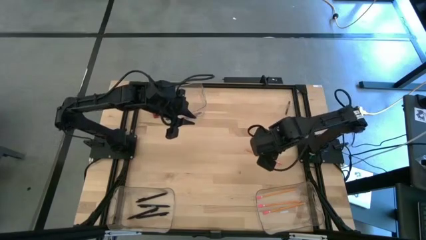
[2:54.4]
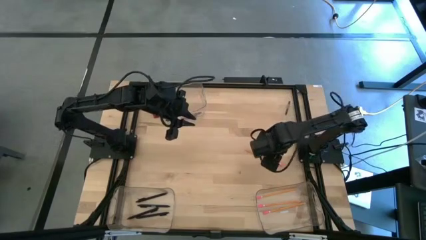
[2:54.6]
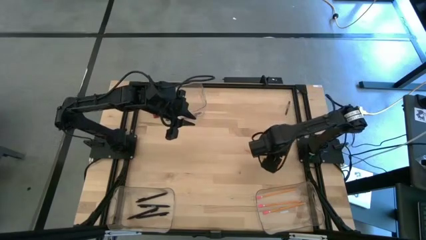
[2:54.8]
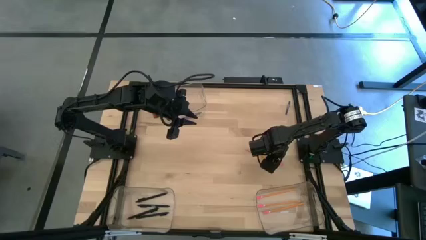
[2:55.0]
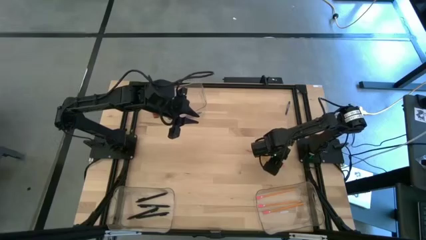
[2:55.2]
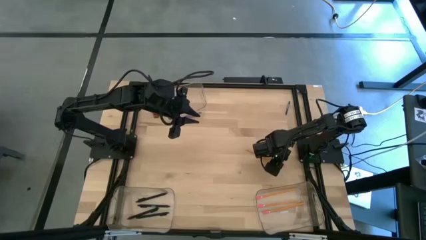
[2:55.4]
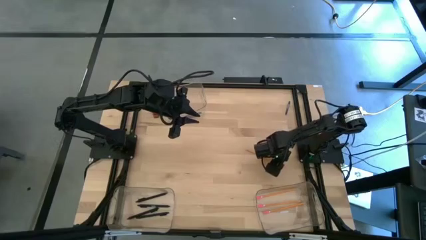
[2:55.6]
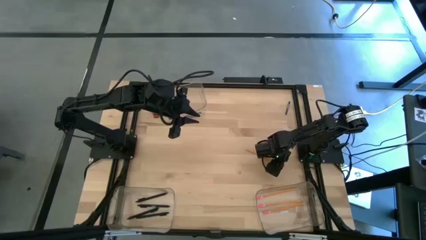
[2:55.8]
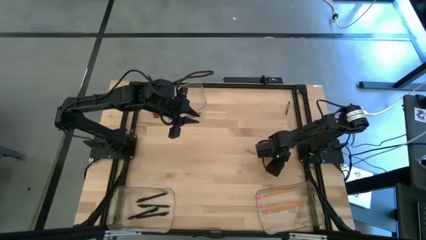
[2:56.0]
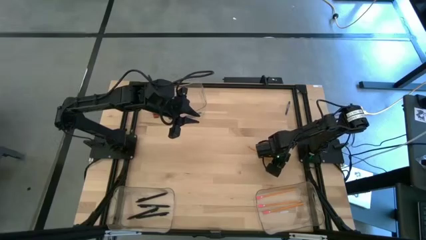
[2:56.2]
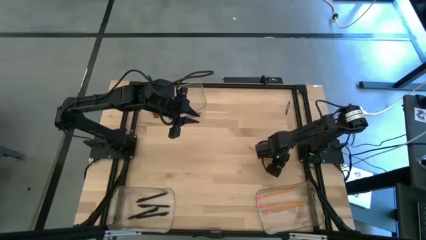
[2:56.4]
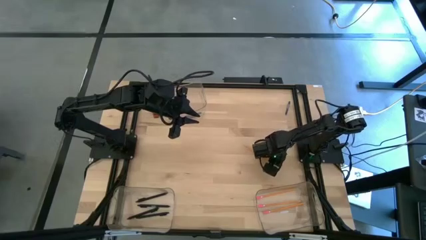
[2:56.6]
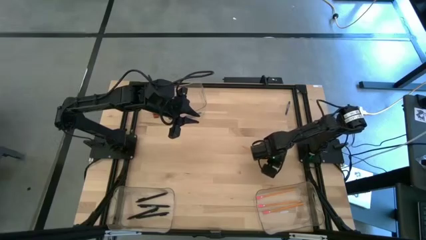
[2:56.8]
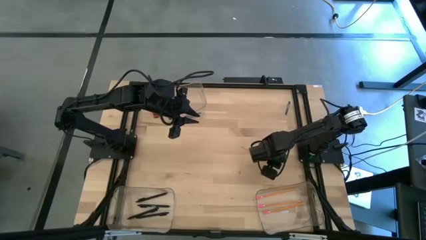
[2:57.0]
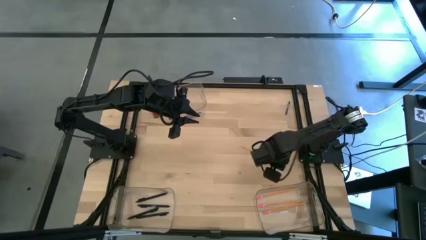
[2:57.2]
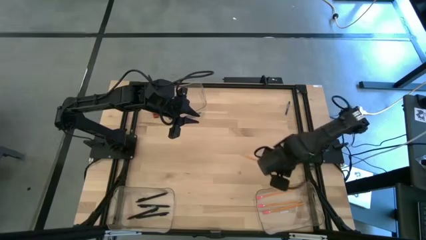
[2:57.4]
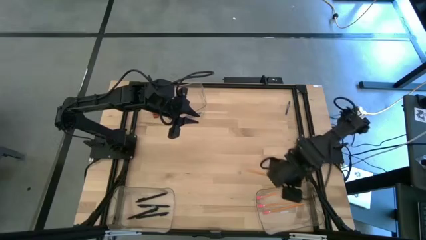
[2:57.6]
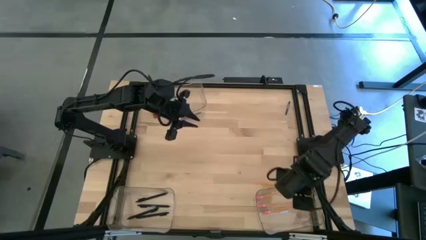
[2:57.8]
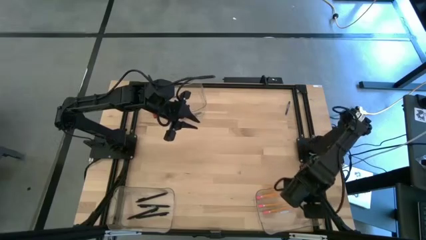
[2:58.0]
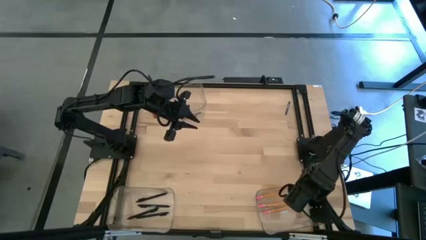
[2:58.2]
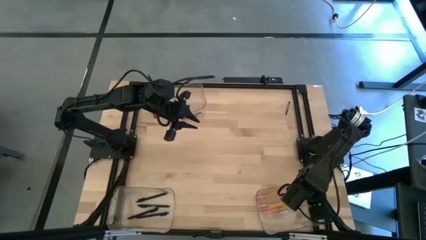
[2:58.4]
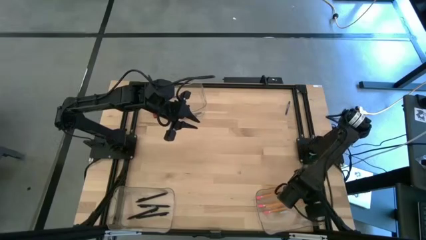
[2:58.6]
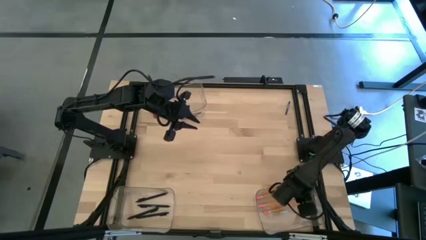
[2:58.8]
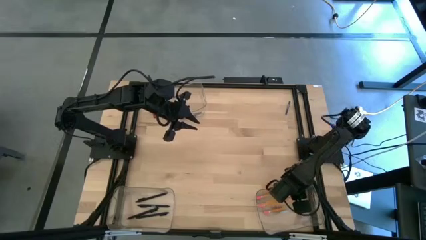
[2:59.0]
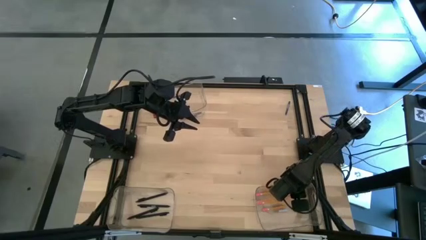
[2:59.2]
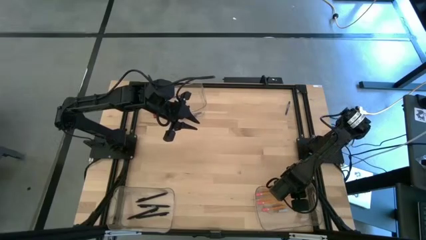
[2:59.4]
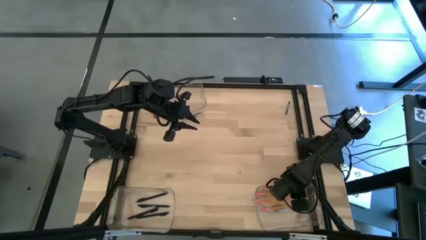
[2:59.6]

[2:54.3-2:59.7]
Task: Sort crayons/erasers/pens/pencils in bins
Put the yellow pencil into the bottom right transparent bin

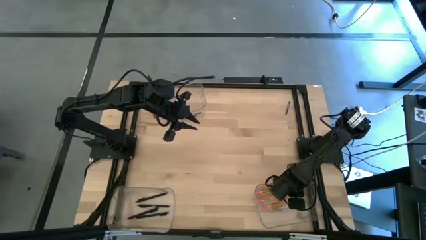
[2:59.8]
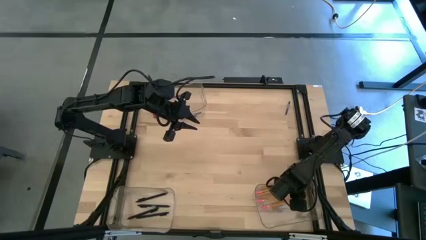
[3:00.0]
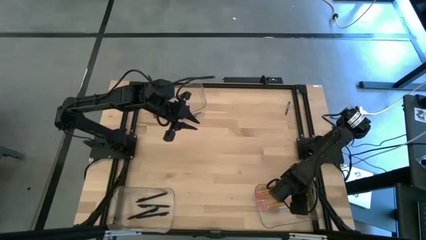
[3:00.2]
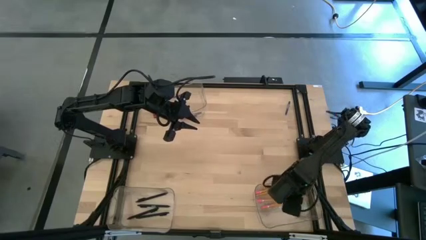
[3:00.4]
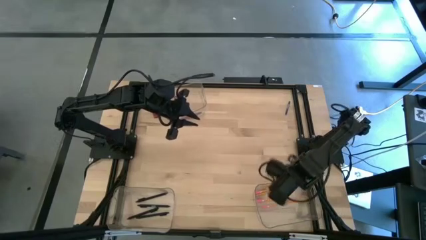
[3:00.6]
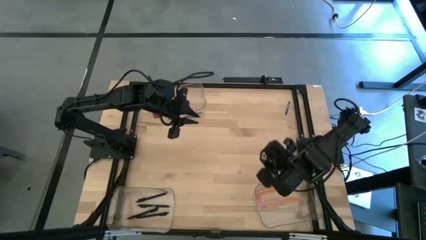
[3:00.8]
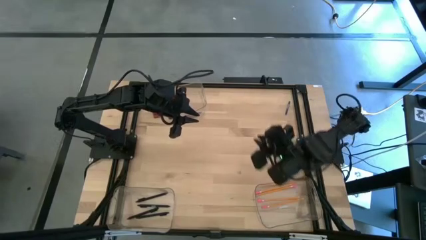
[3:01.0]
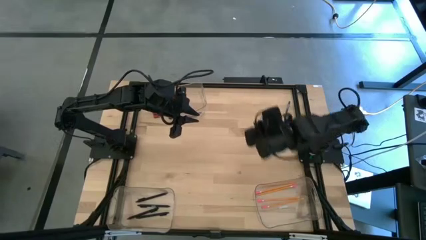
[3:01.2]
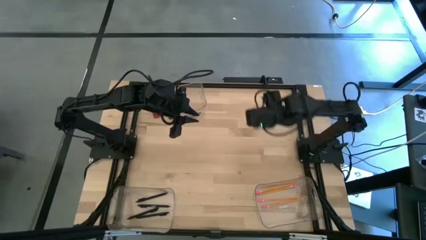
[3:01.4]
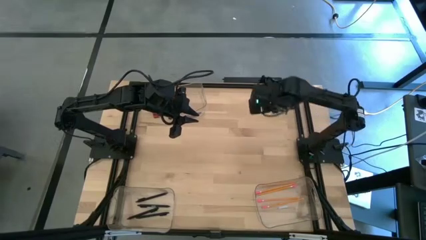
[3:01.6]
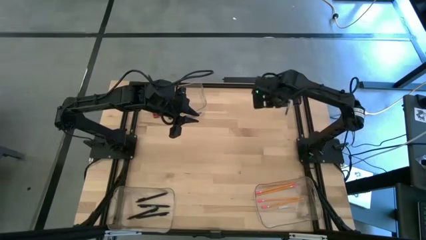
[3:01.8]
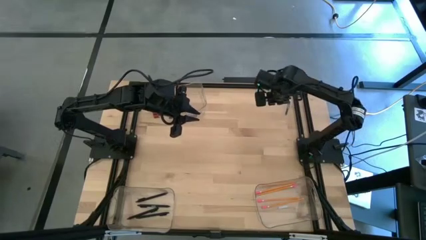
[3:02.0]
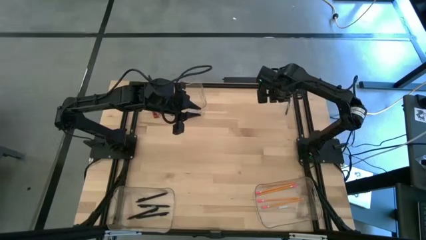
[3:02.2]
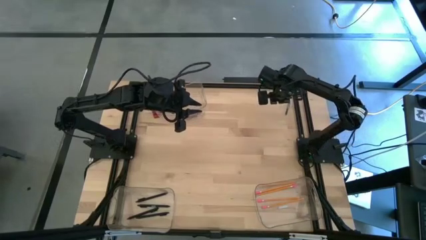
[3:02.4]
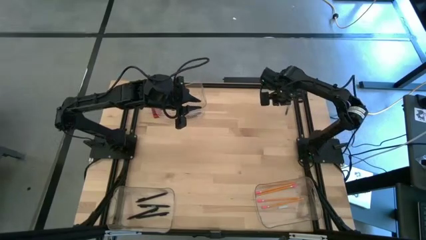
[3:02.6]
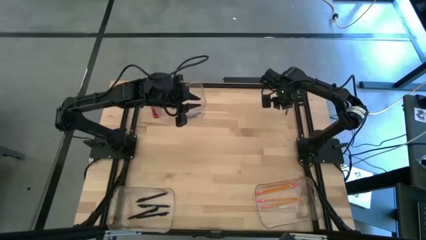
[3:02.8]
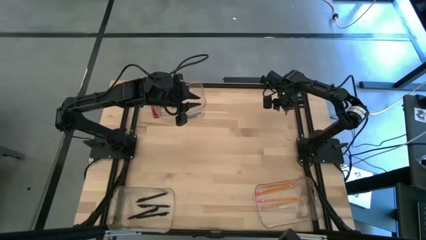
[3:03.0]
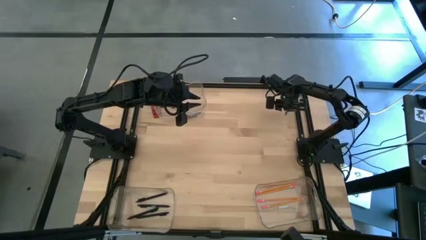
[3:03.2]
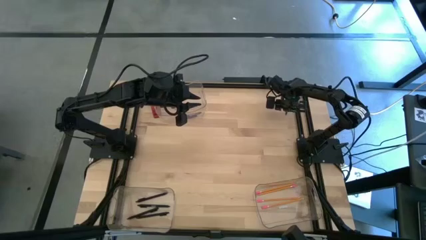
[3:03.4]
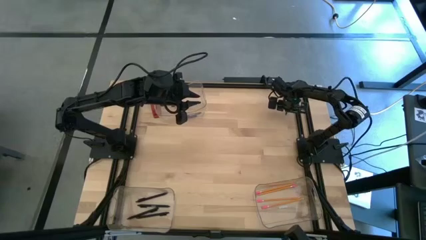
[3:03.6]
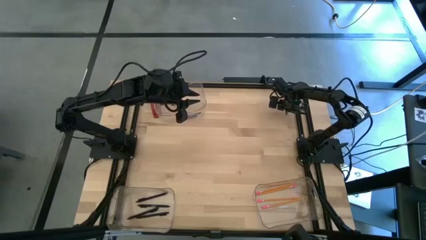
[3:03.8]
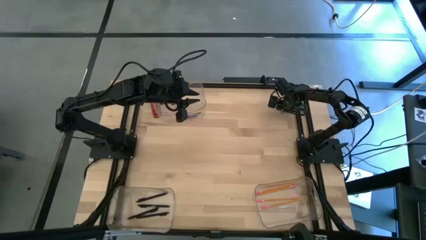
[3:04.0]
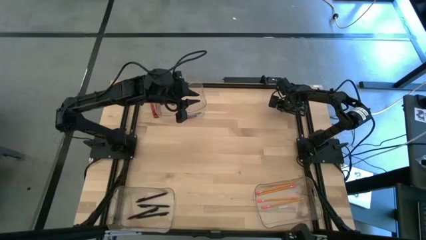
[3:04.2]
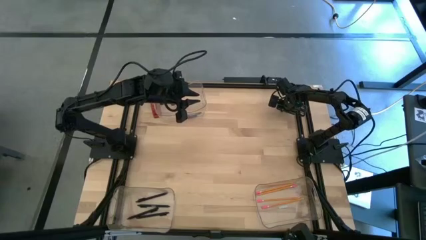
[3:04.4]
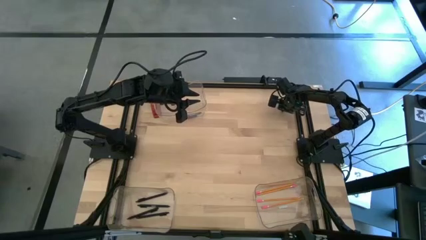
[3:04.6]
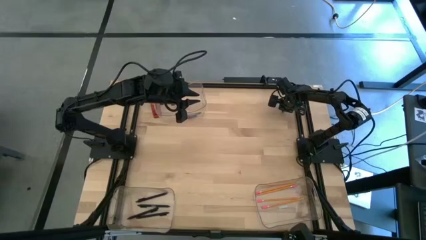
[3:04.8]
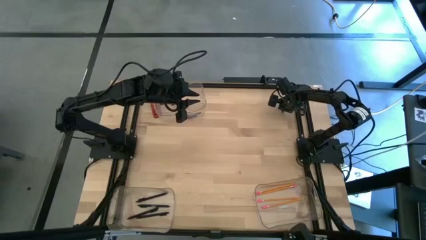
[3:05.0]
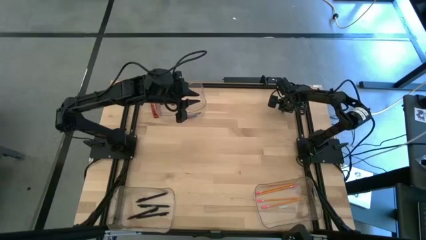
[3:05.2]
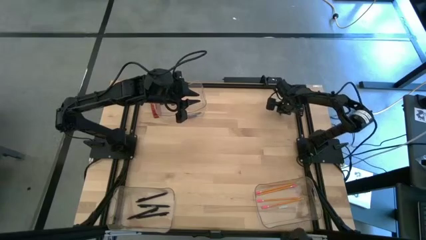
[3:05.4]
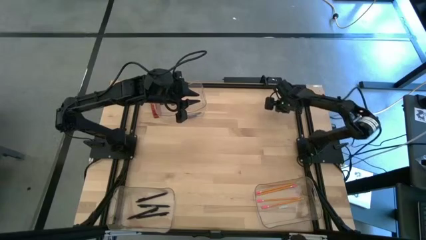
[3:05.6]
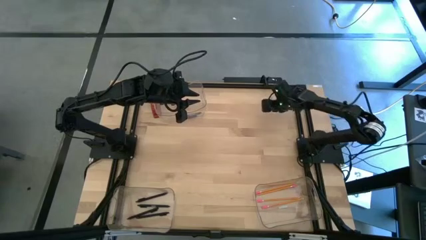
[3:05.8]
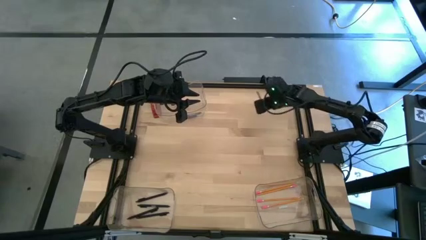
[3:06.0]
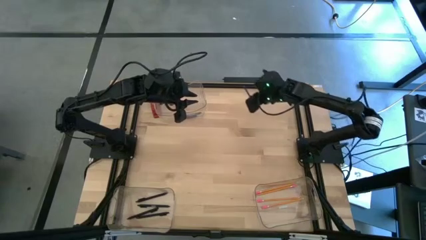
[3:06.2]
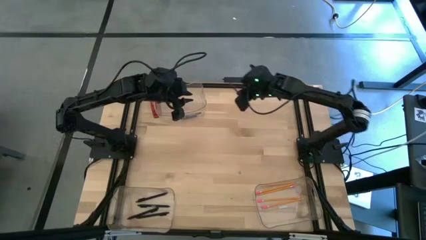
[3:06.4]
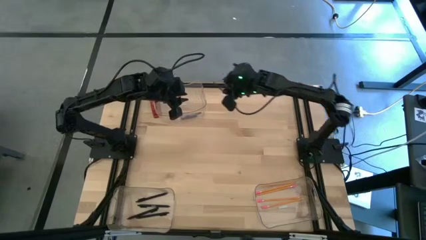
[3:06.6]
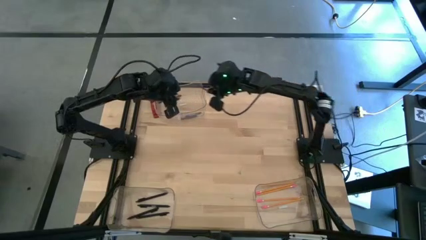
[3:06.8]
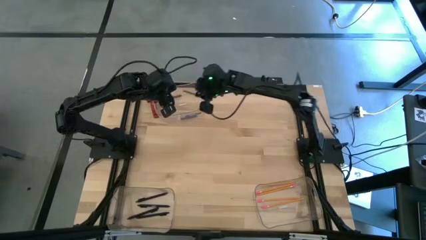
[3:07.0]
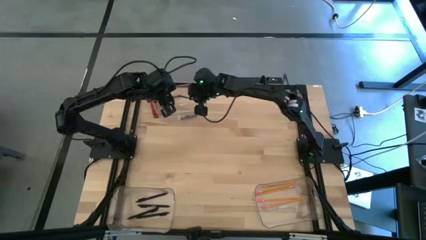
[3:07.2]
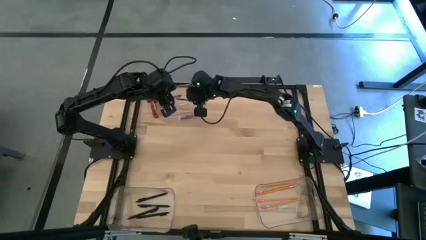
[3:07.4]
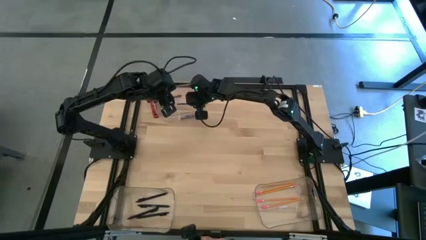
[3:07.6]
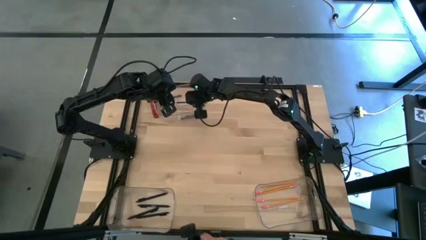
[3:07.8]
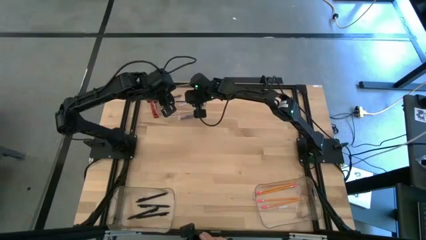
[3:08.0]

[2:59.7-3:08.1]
Put the blue crayon into the top transparent bin
